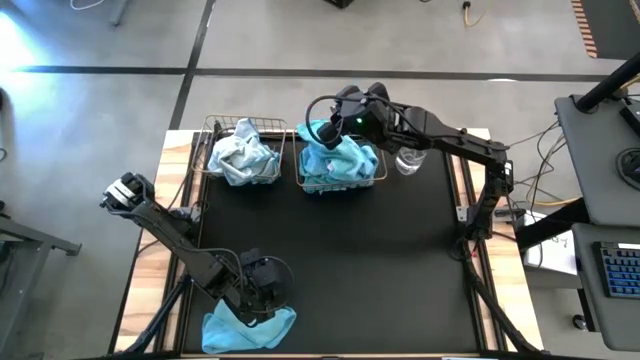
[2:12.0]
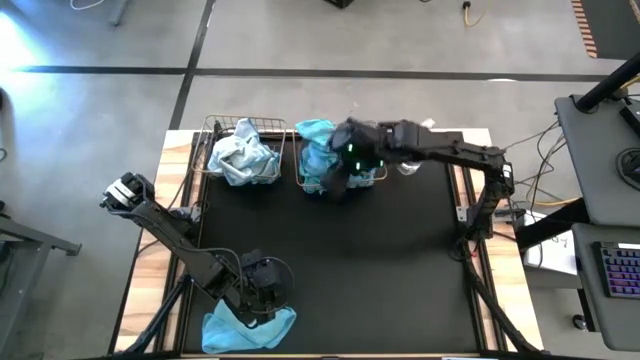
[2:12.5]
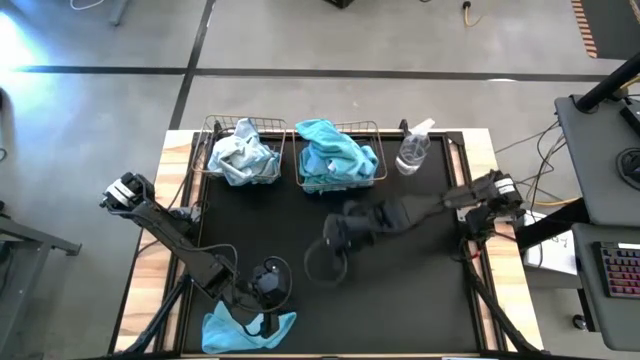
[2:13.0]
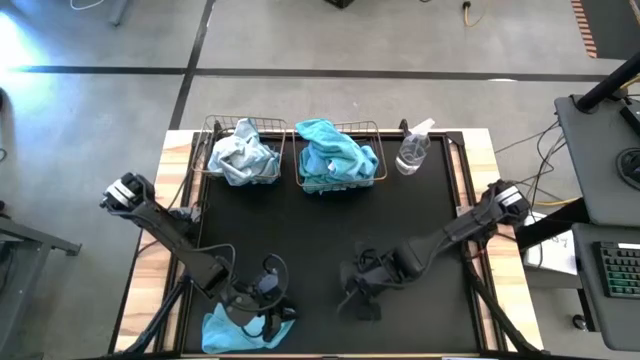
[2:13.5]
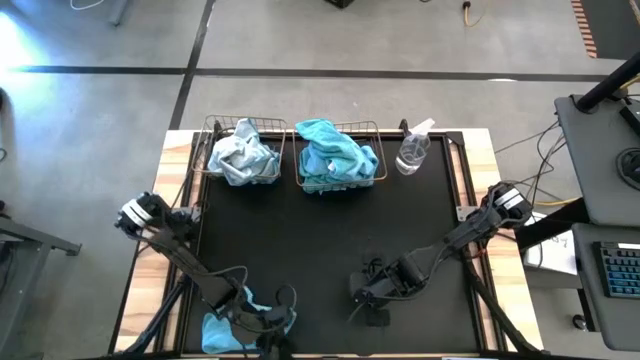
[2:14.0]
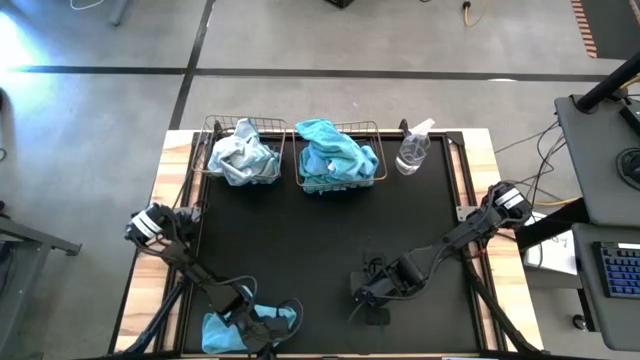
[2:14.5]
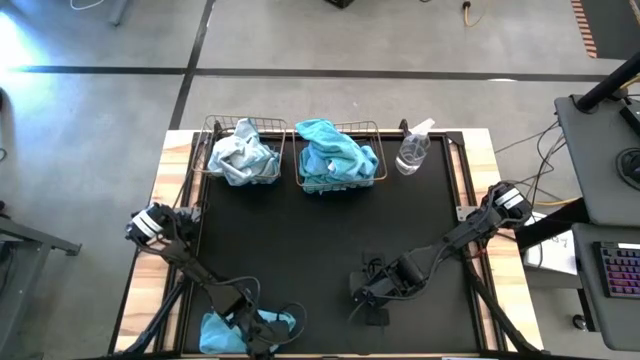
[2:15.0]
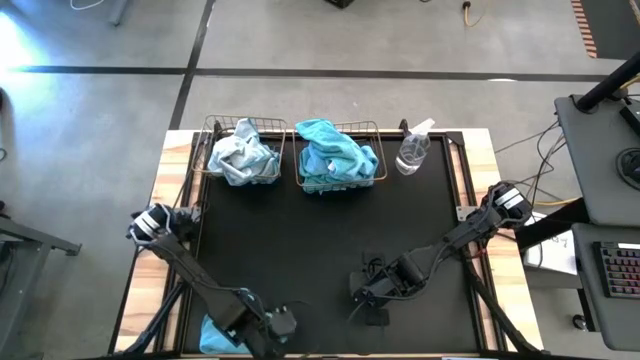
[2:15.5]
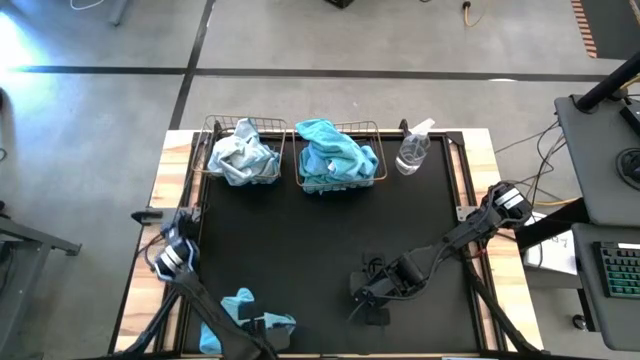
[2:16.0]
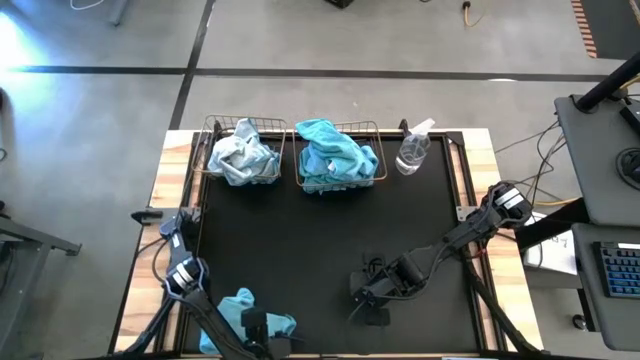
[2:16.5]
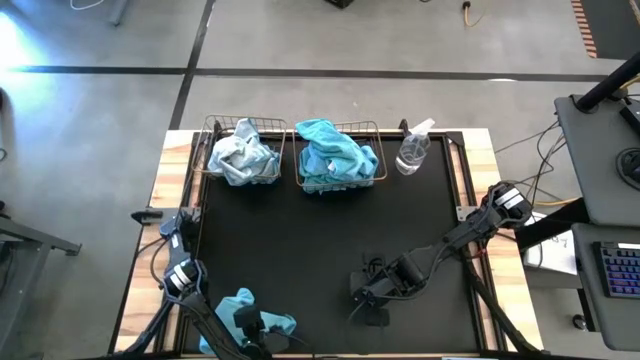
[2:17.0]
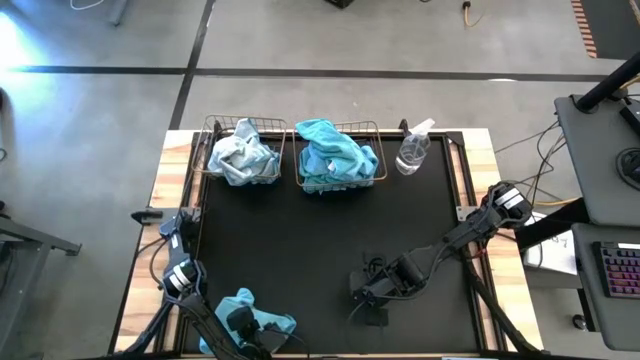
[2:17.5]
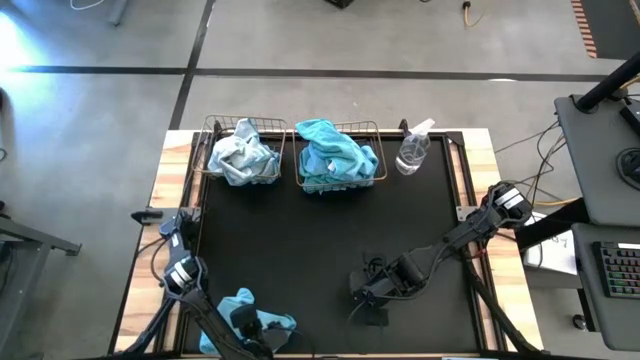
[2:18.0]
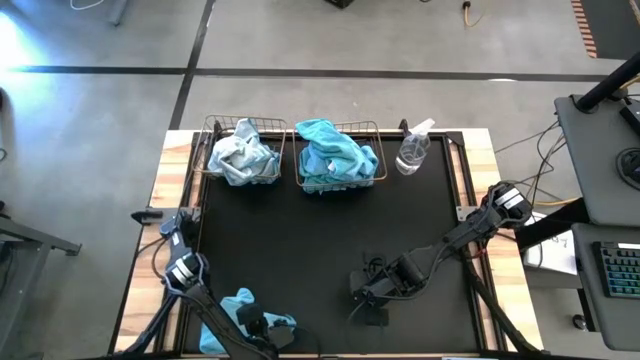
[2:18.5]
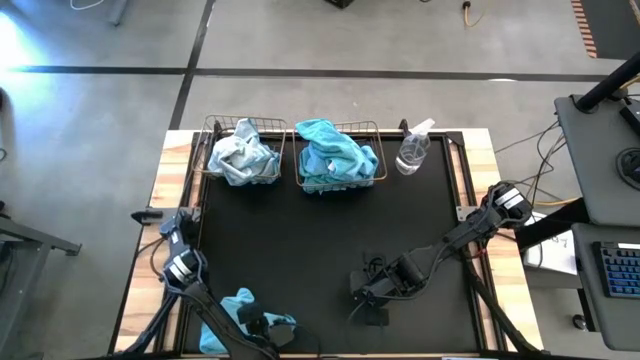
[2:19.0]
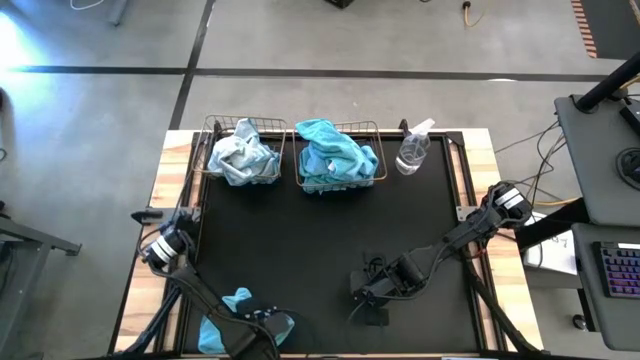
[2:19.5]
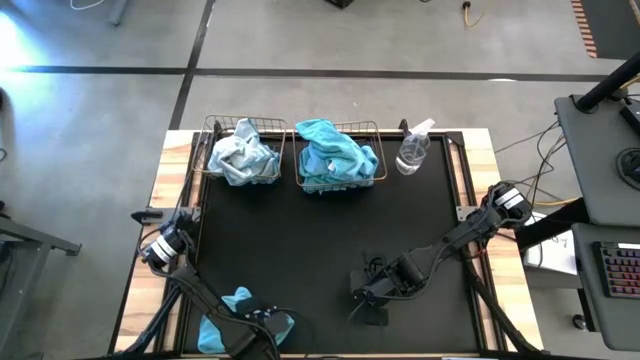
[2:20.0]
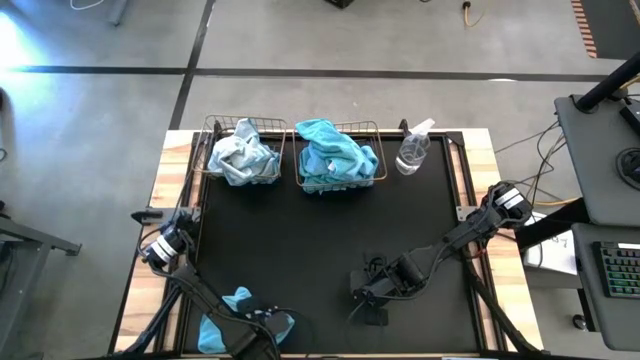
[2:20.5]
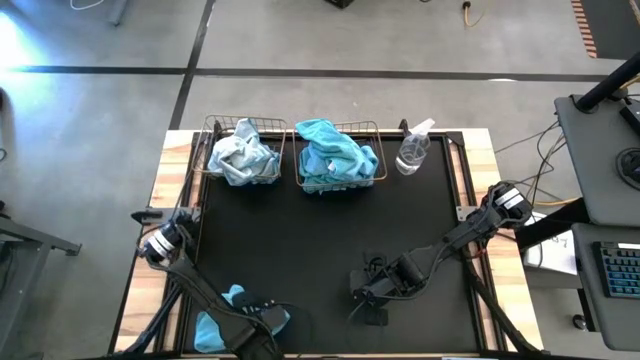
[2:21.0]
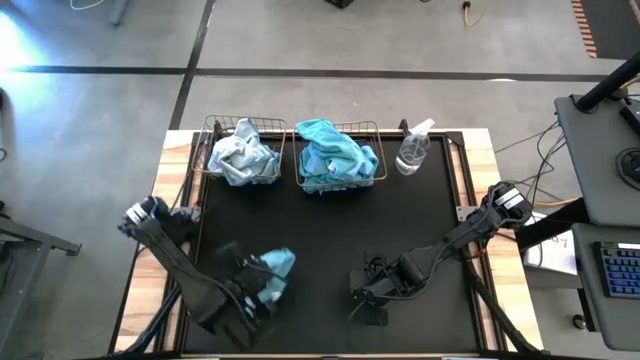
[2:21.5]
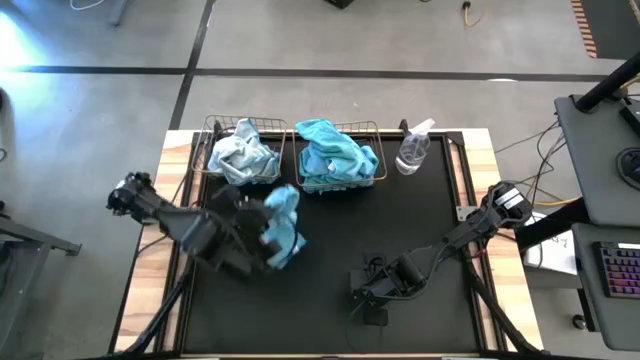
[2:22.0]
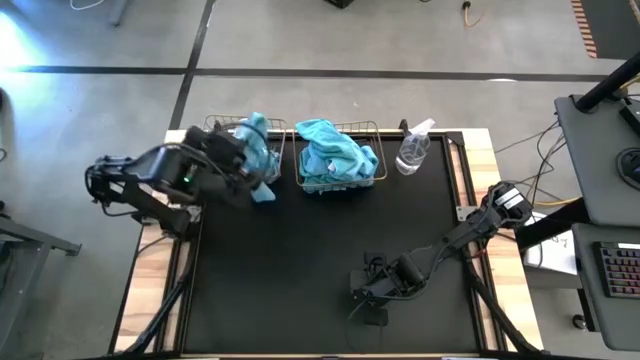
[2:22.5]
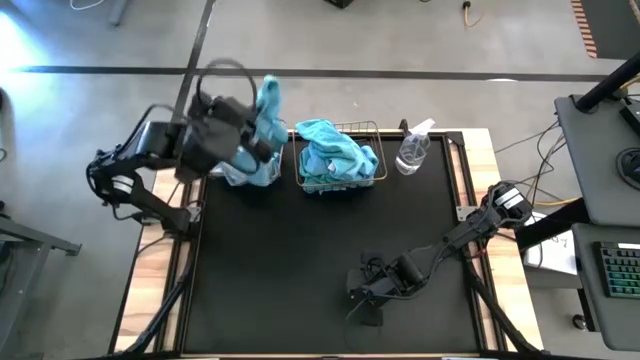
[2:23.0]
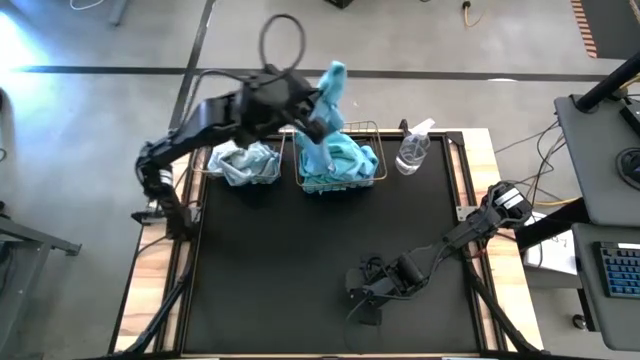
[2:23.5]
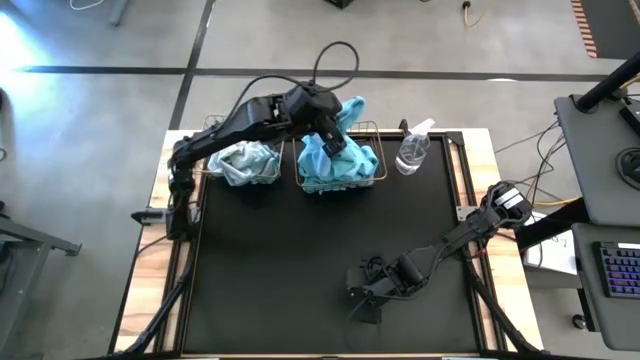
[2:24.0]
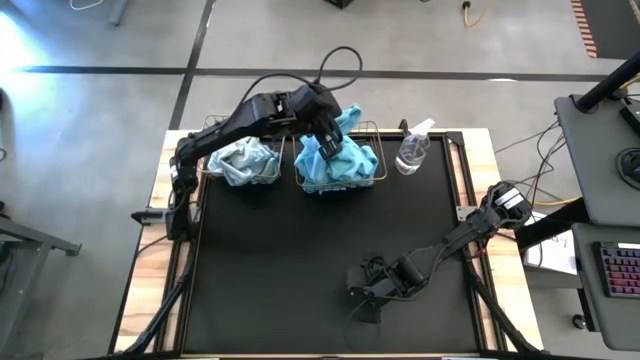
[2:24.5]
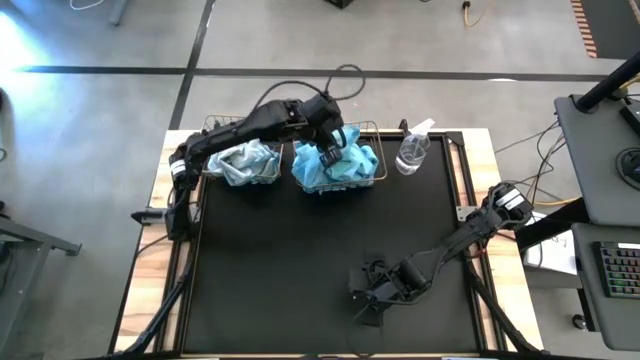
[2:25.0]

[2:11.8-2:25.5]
Task: Sort microfiber towel by color & place in baskets
Put the blue microfiber towel into the right wire basket

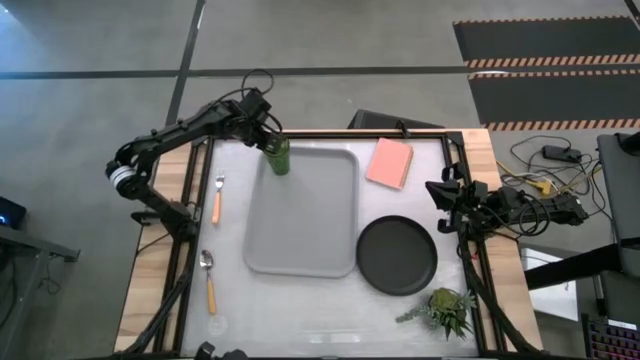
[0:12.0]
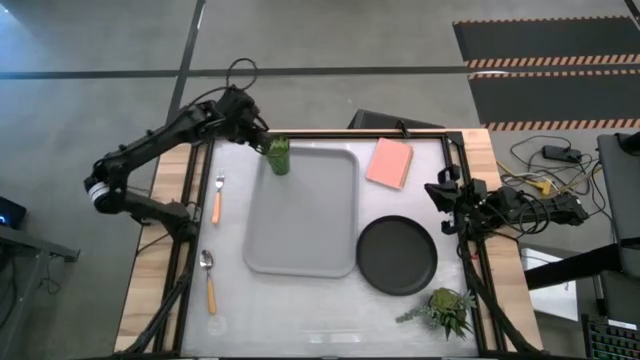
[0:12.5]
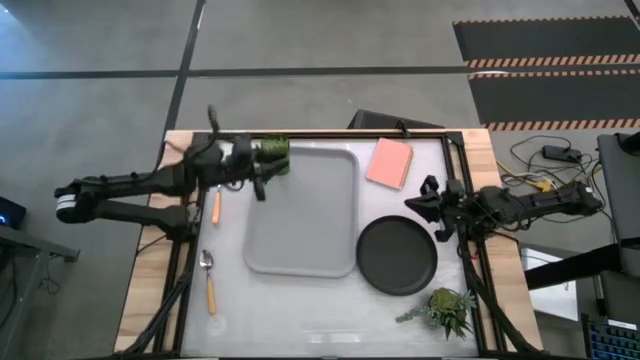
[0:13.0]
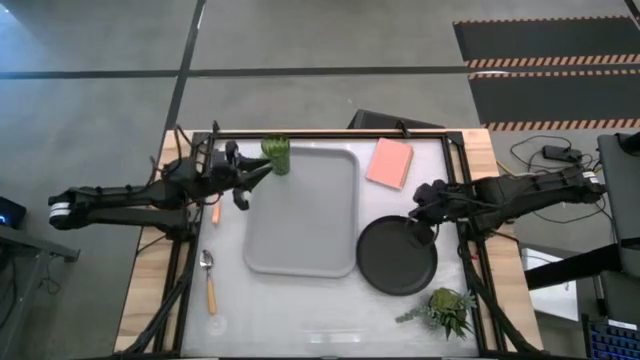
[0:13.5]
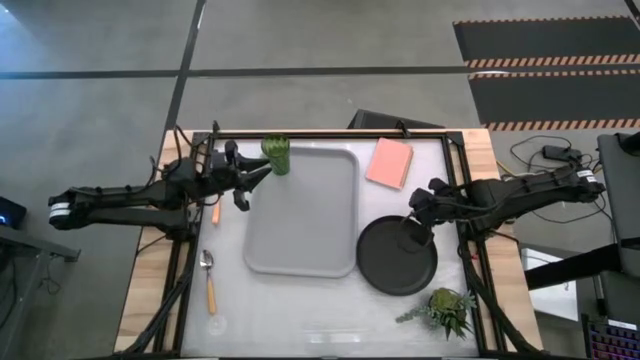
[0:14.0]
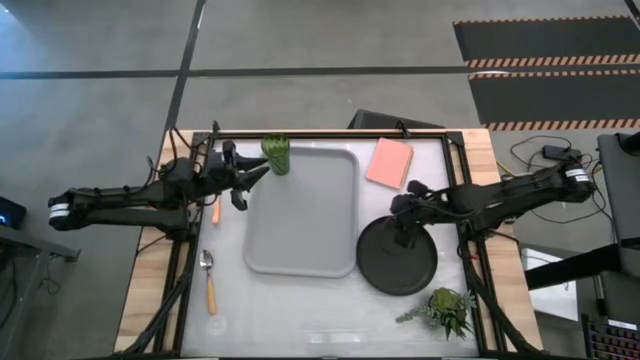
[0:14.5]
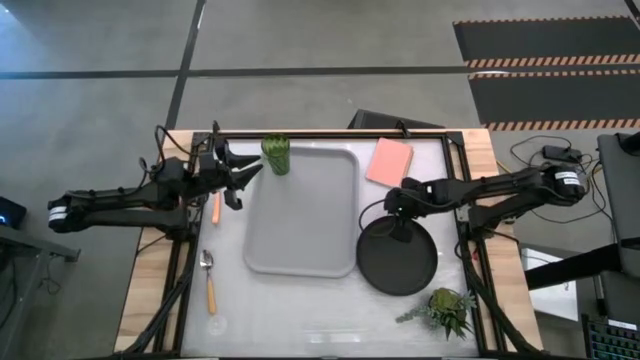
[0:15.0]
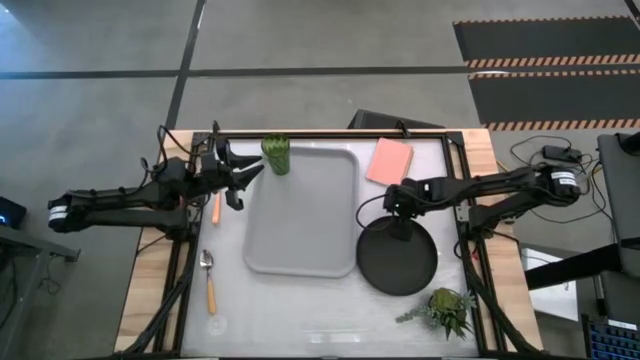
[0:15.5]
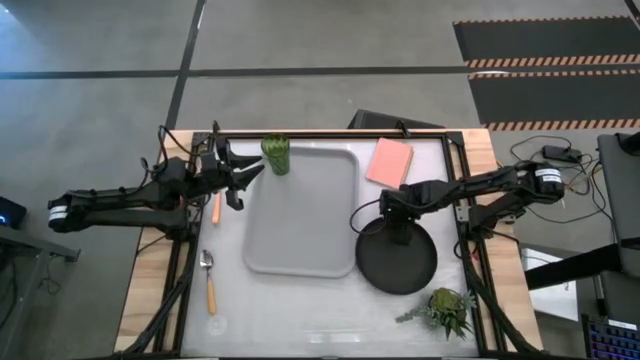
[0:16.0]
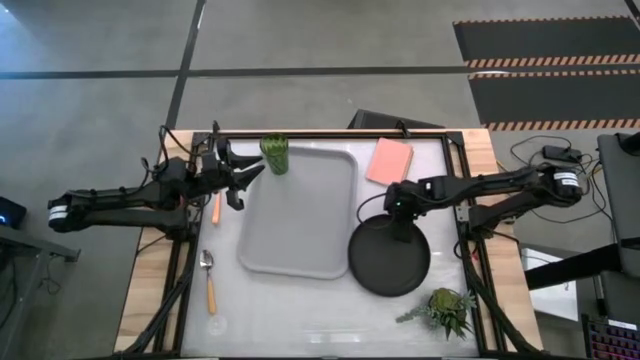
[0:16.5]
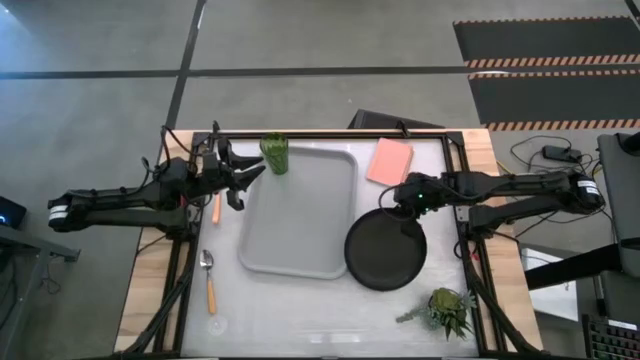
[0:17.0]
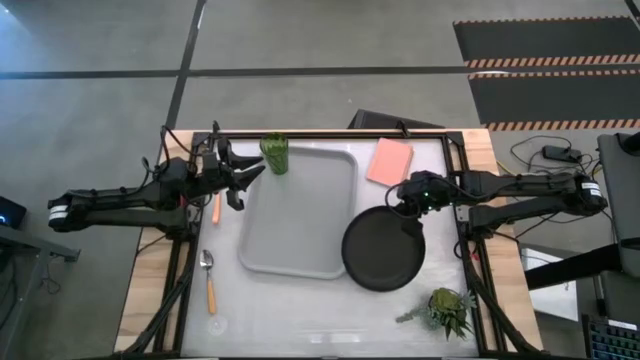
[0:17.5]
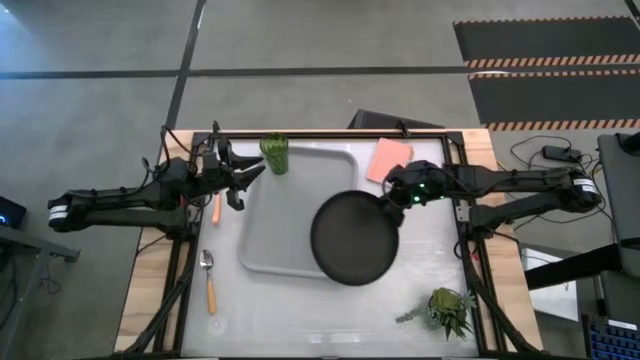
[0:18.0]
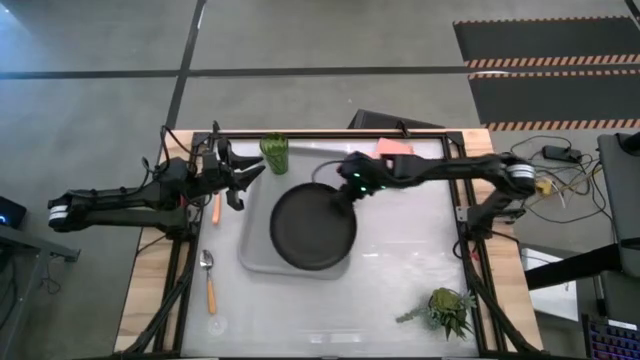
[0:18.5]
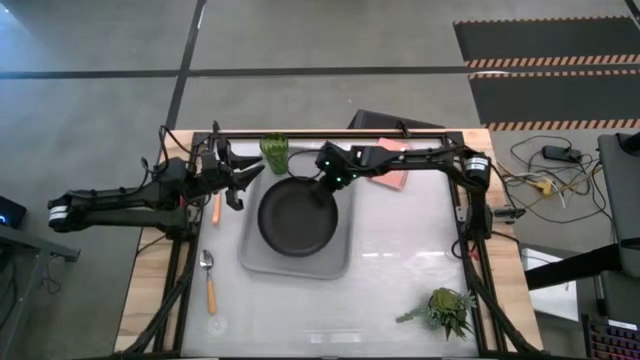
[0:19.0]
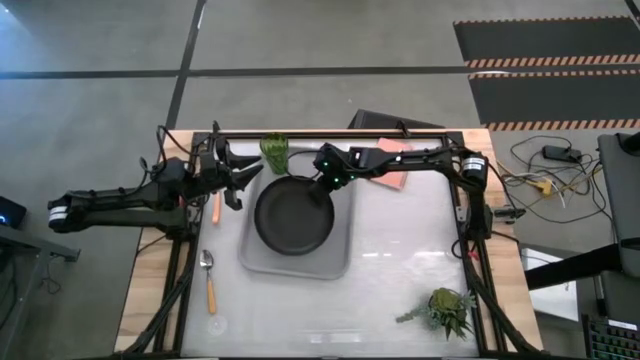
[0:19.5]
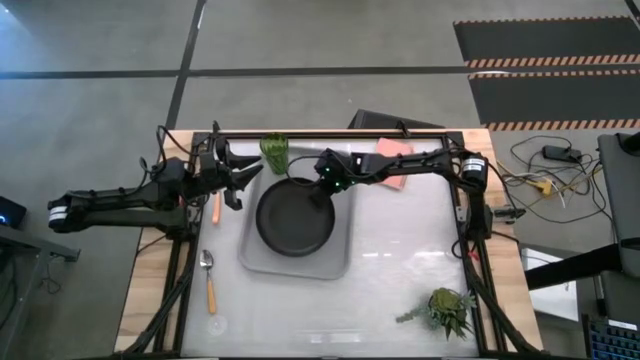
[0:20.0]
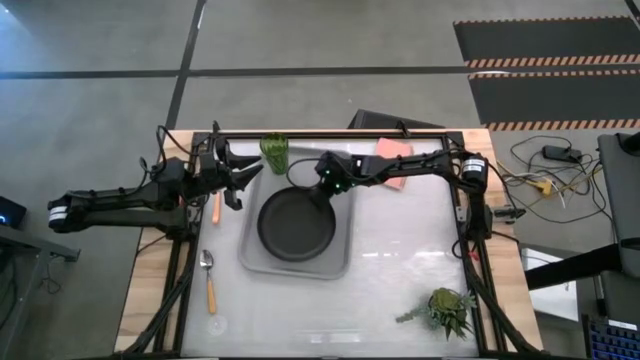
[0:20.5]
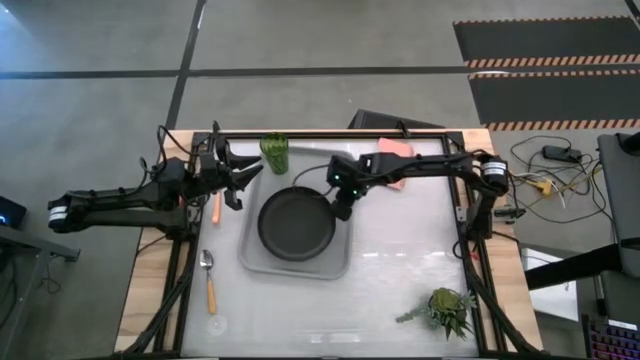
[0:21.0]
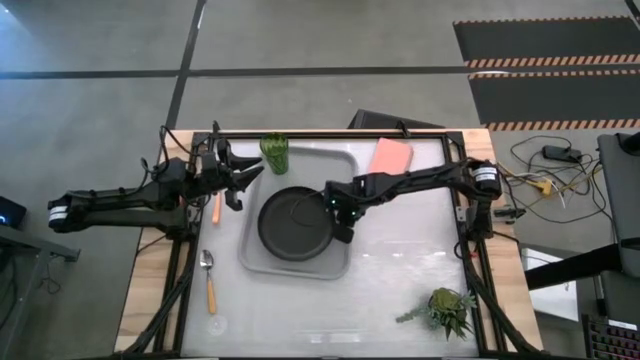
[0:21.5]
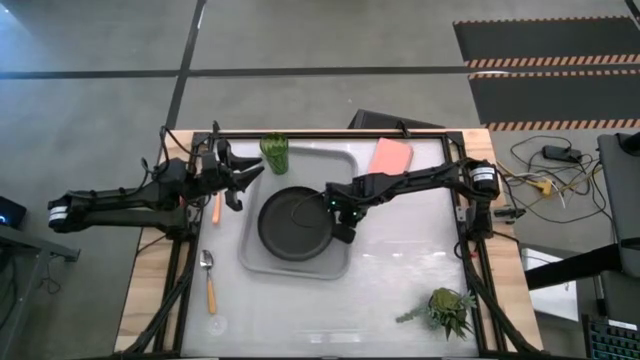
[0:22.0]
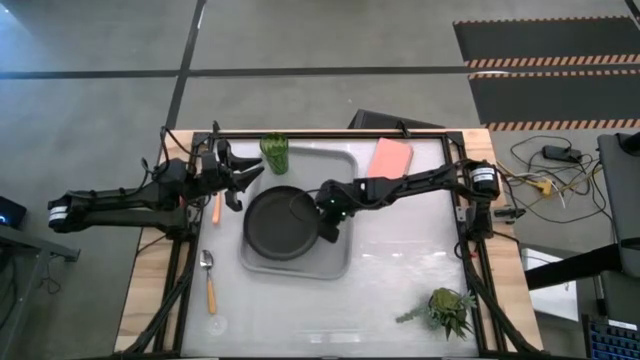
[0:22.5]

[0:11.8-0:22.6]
Task: Pick and place plate/cup/fork/spoon on tray
Put the black plate on the gray serving tray to the left of the green cup
